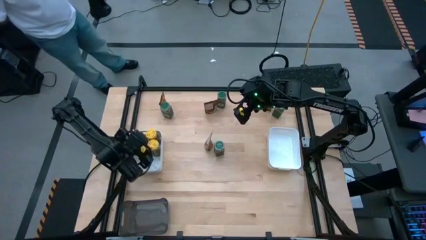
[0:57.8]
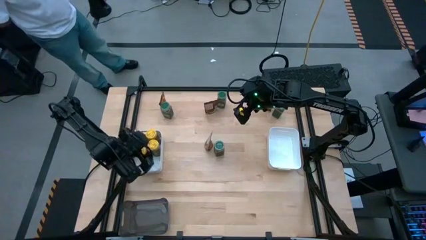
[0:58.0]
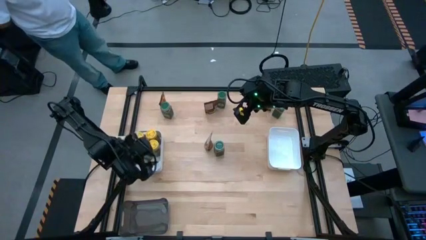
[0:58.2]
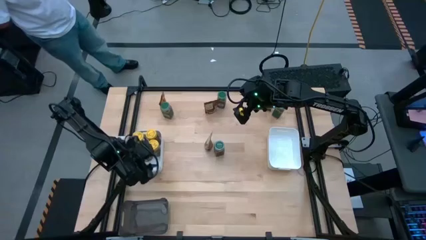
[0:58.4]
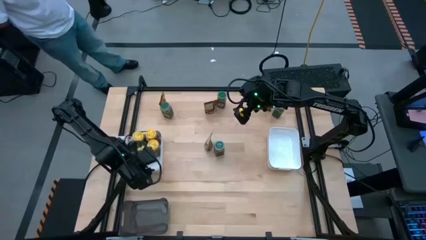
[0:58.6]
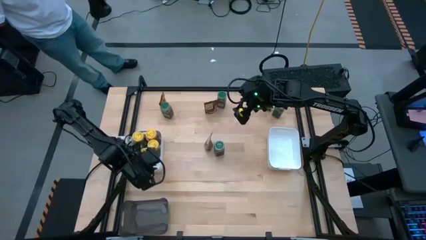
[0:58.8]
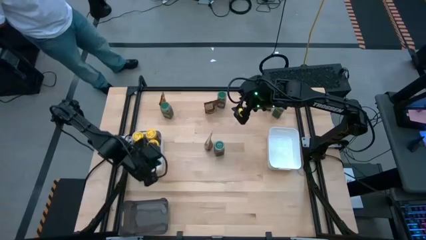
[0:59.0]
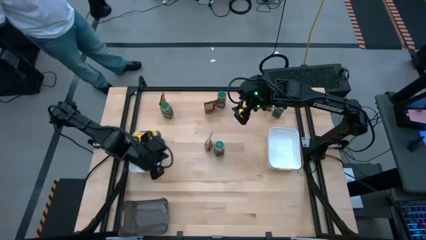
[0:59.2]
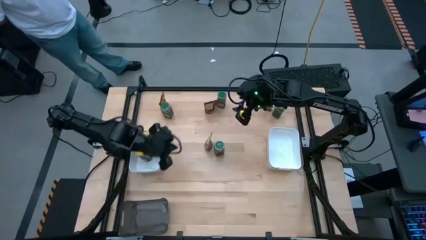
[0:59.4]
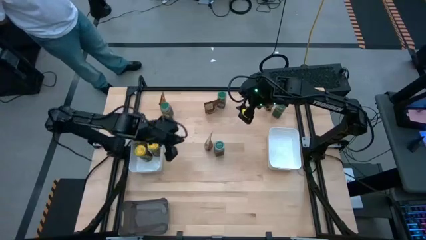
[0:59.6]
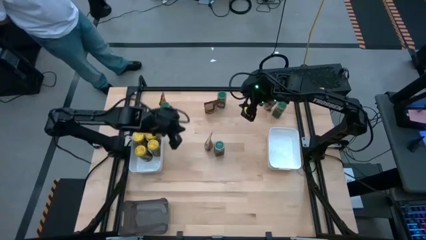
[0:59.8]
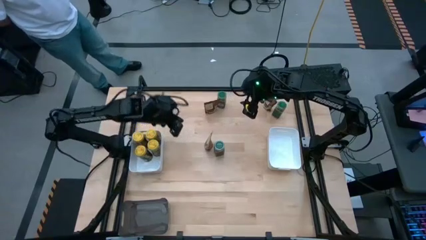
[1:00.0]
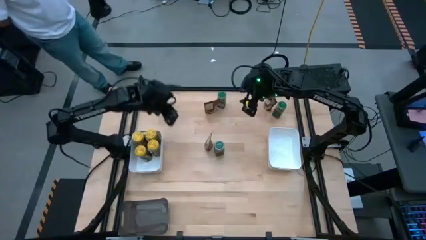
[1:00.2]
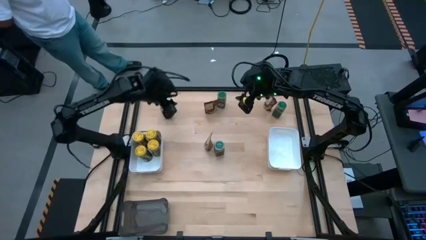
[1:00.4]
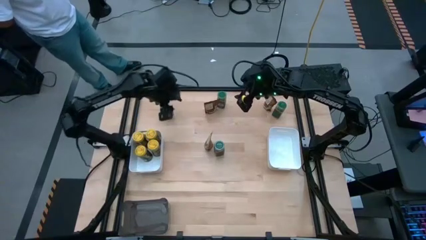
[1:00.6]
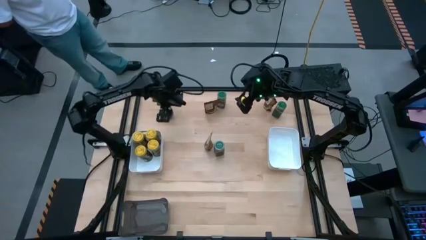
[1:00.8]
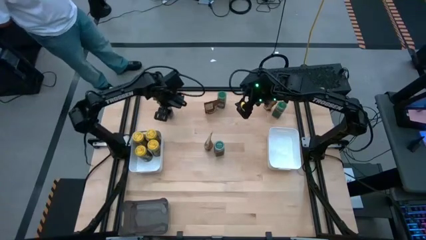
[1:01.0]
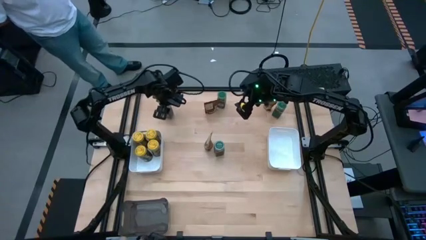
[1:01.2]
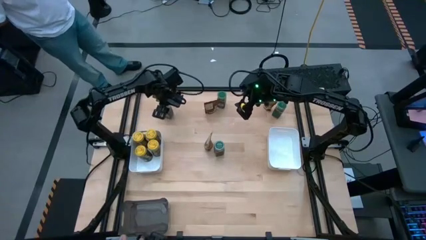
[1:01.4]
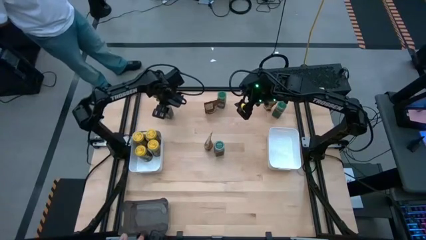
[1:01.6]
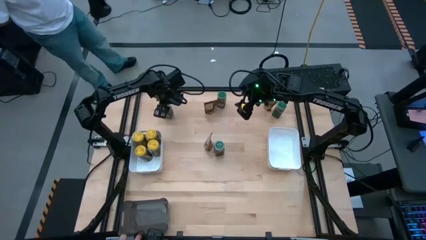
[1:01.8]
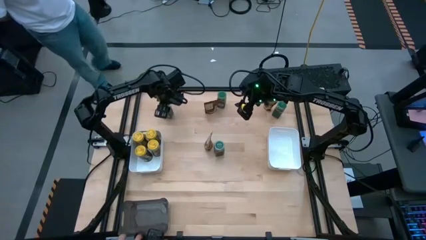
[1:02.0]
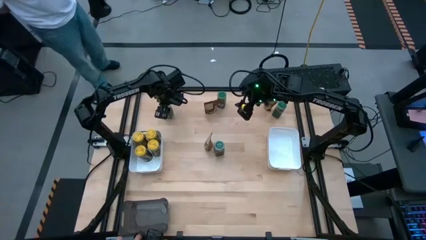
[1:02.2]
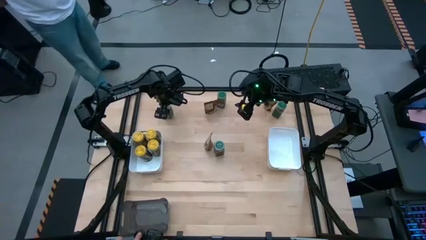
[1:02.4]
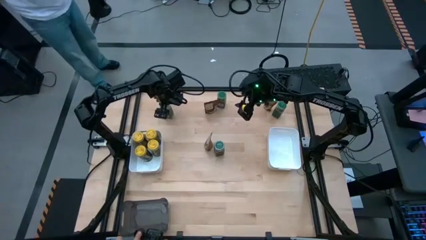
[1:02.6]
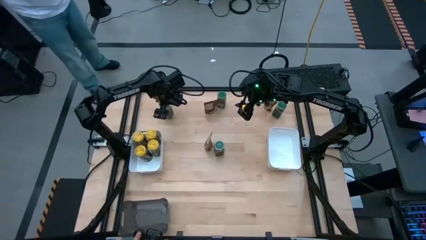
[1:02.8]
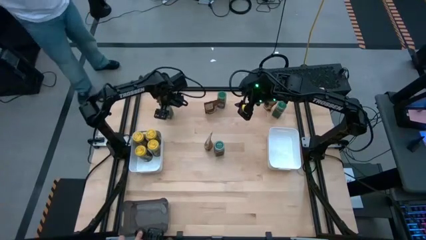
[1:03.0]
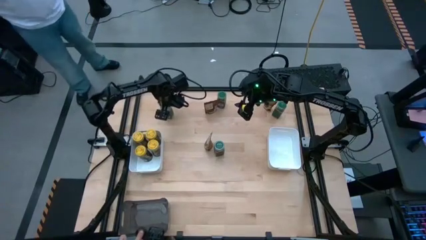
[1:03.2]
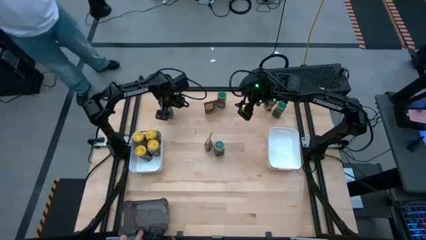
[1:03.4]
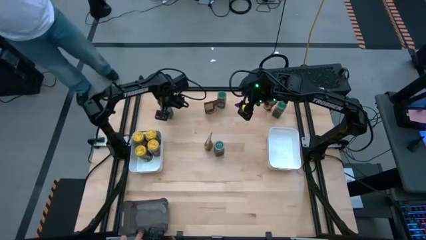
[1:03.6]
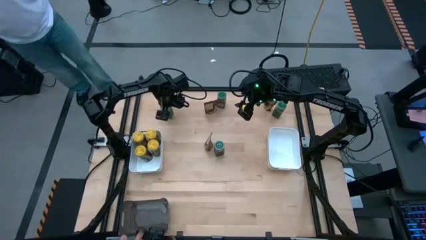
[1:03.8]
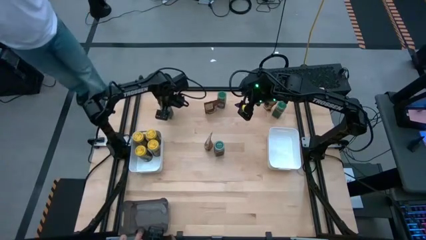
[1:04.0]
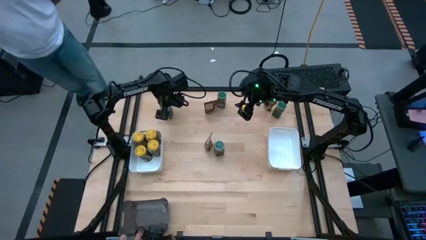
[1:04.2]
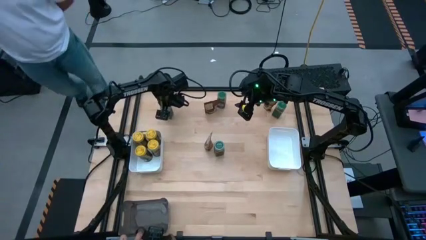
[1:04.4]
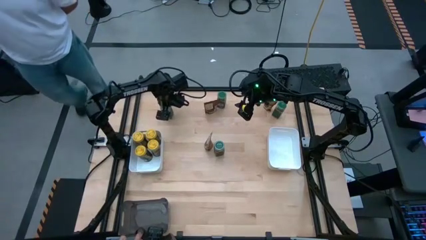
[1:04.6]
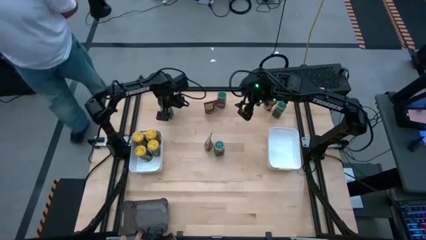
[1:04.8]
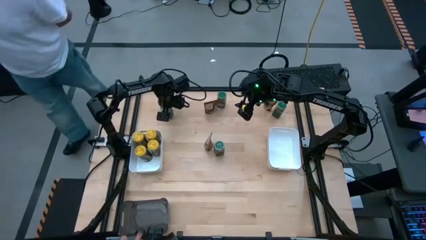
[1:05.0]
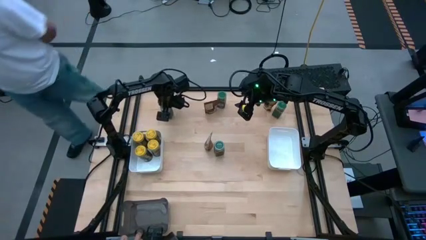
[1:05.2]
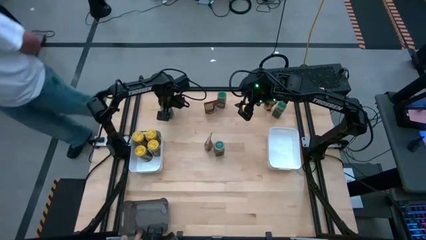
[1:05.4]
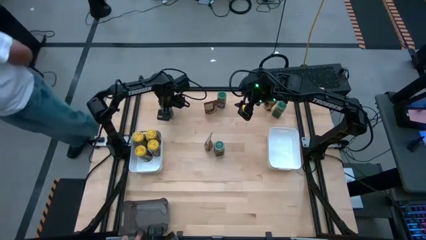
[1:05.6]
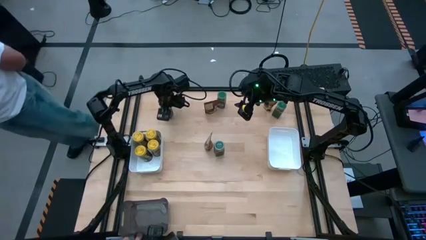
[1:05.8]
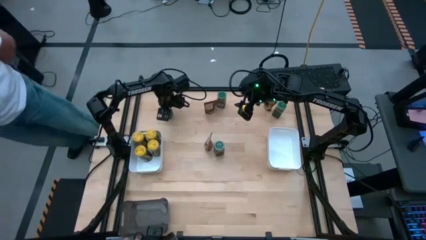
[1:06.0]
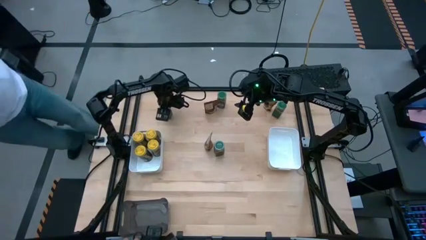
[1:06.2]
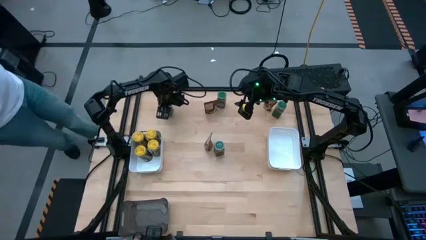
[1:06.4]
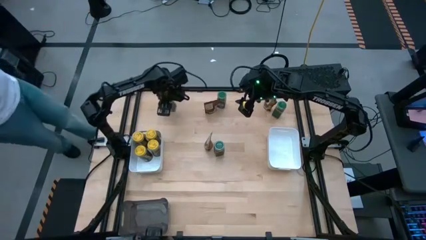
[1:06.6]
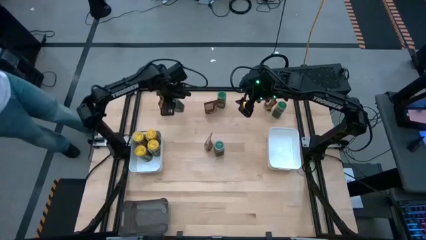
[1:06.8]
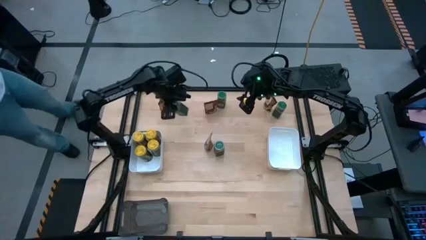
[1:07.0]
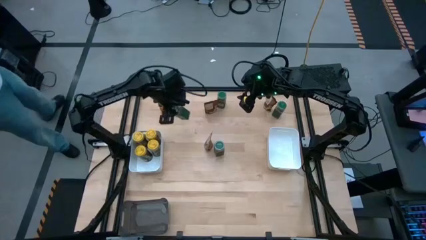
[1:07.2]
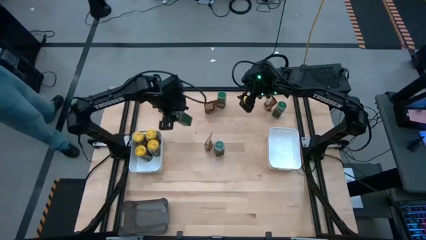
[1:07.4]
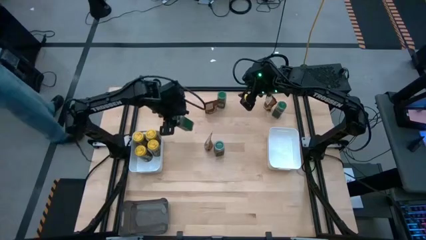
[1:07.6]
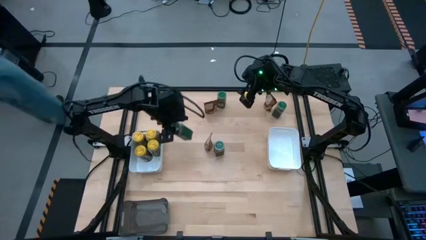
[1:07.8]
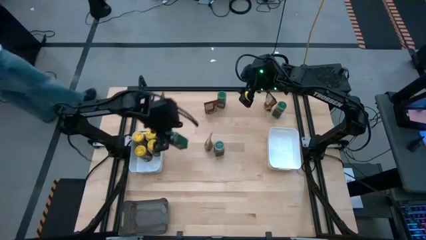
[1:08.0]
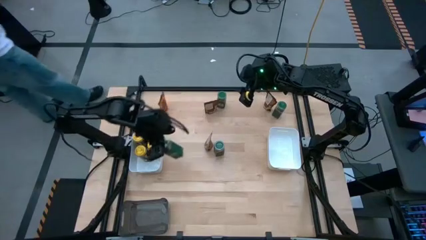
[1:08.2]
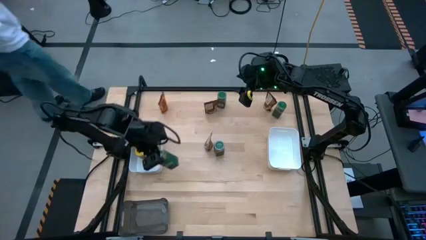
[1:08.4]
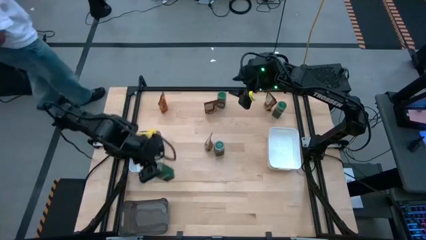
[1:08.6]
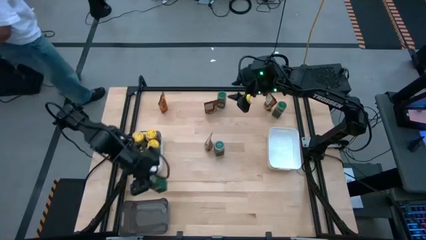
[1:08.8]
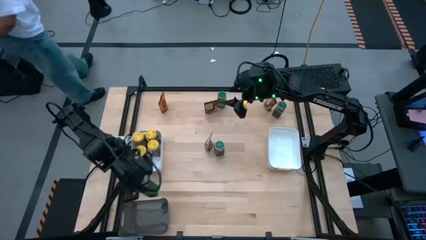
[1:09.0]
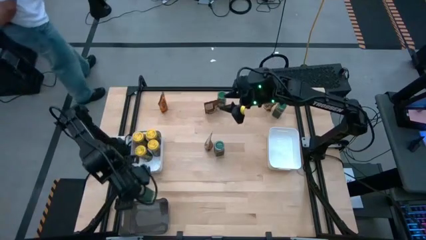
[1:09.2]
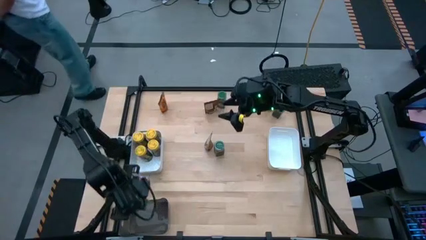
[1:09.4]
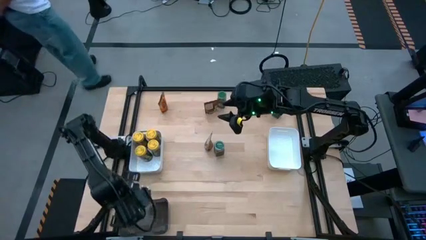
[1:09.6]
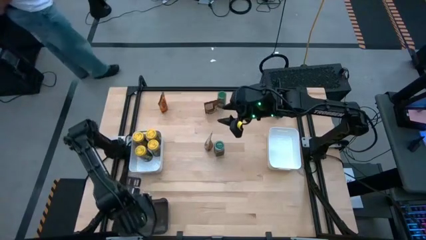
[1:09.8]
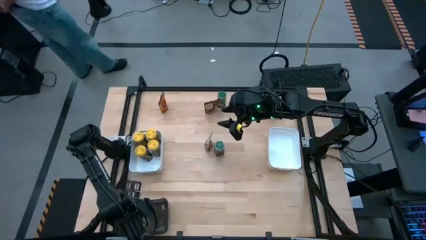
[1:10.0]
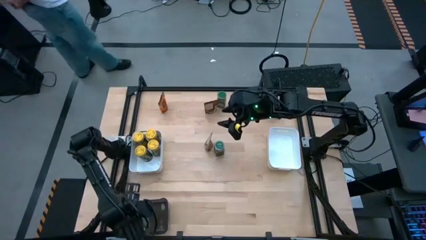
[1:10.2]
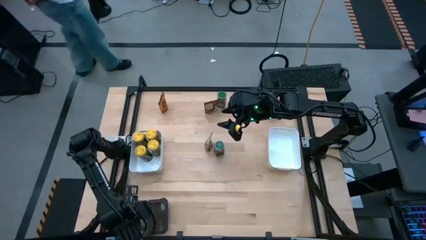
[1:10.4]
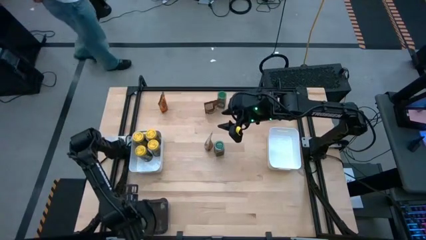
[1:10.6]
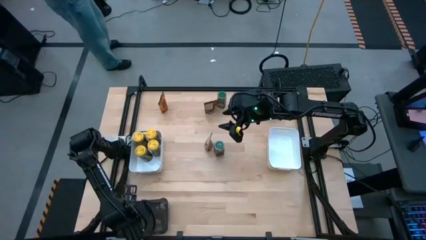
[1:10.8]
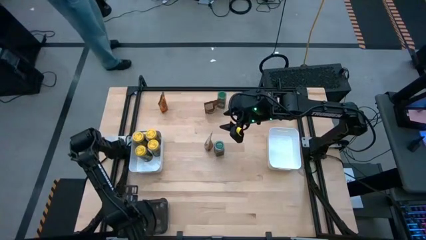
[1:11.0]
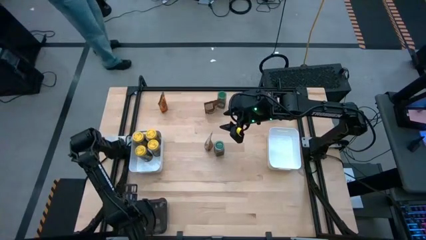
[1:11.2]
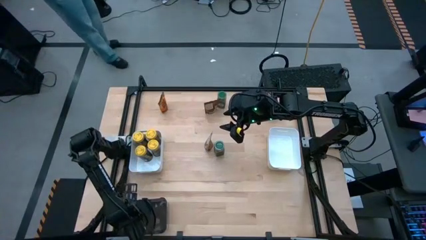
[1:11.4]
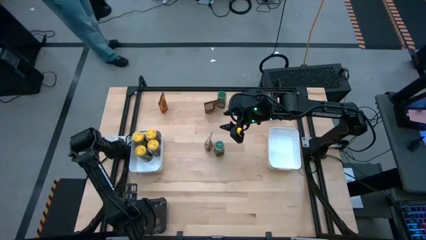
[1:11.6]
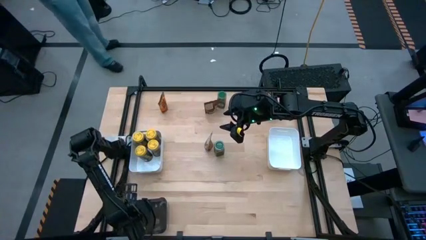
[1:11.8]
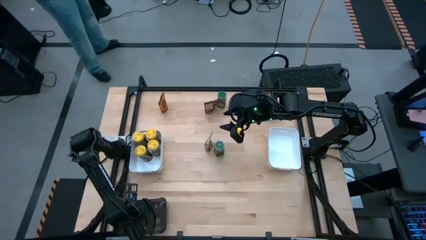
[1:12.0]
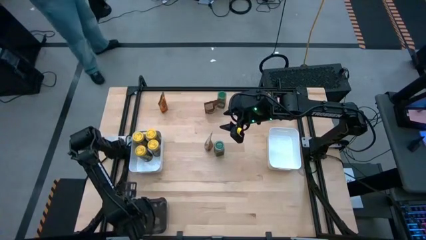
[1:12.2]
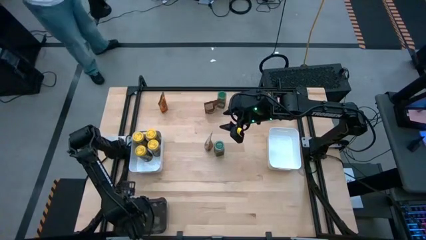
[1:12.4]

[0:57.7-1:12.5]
Task: Sort spices by type
Put the top left green seasoning bottle into the black bin

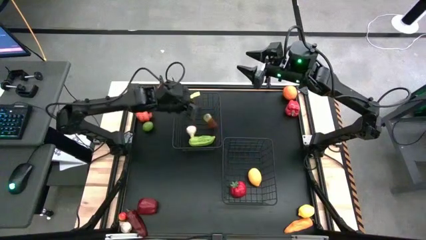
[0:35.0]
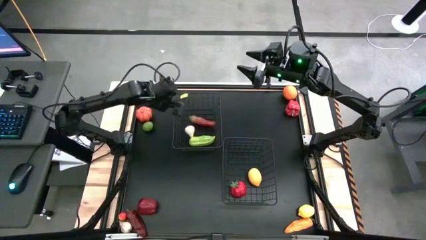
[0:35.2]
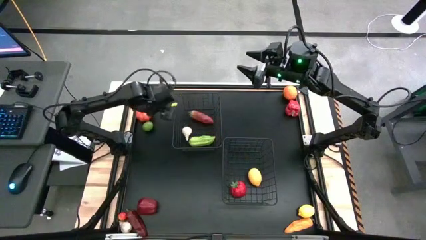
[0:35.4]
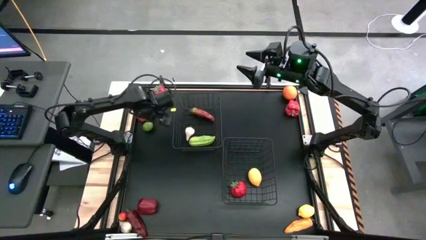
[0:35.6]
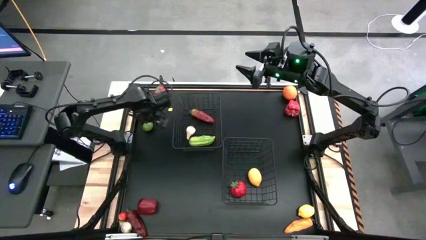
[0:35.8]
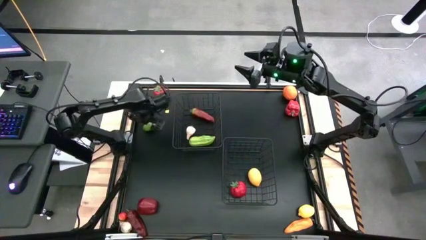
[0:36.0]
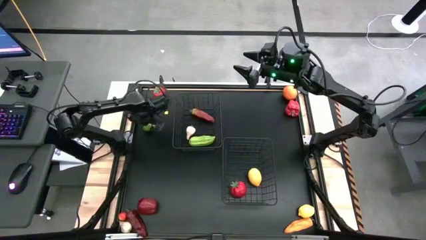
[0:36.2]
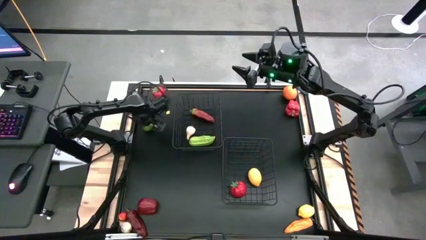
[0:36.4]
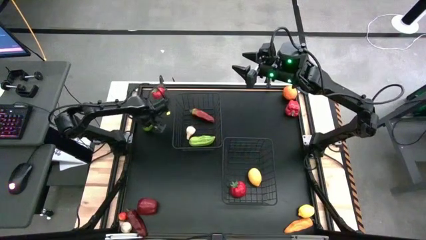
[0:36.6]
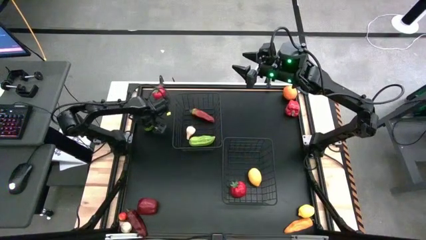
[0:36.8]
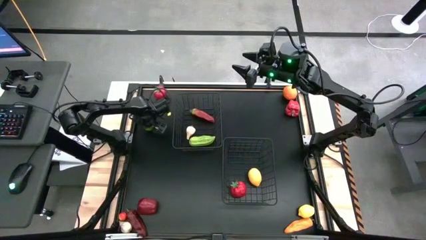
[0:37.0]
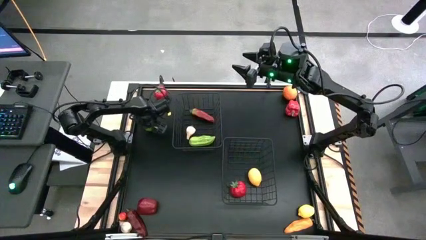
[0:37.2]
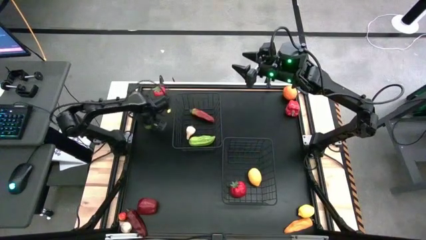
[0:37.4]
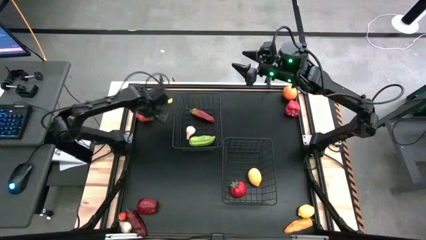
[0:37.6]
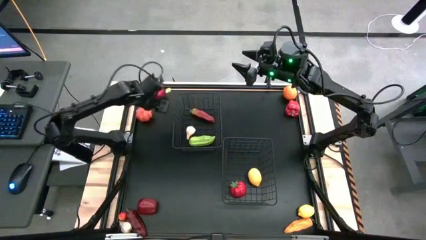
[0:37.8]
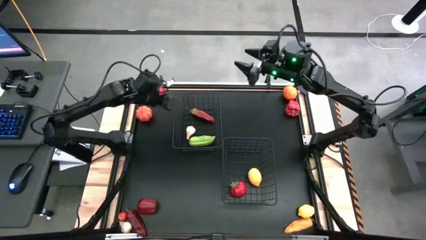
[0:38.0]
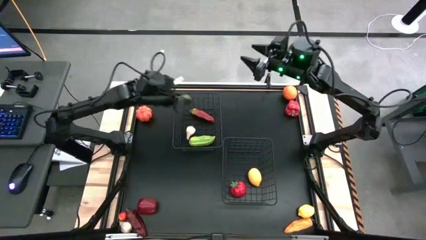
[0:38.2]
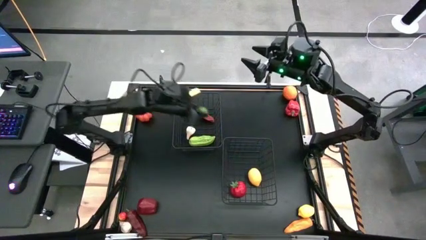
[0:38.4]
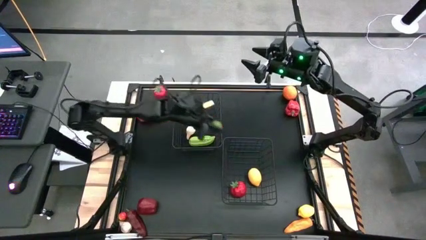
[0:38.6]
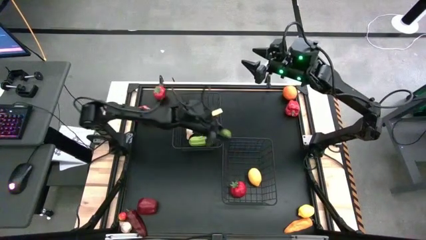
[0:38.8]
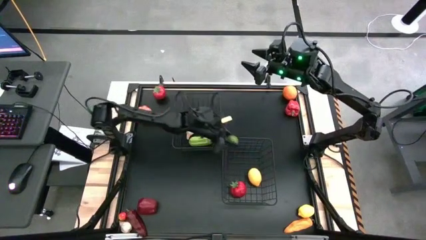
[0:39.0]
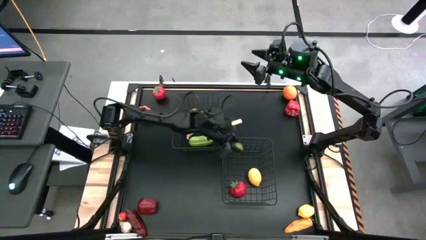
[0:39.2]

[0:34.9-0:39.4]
Task: Sort produce into baskets
Put the green lime into the bottom black wire basket
